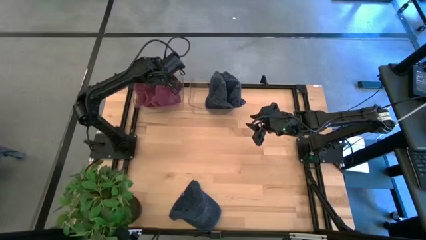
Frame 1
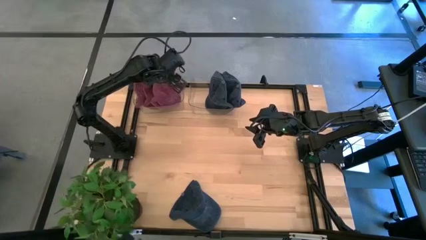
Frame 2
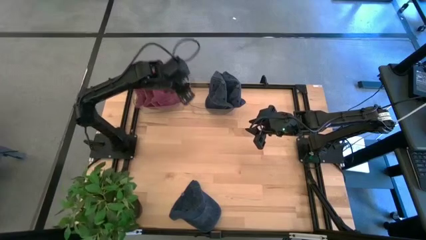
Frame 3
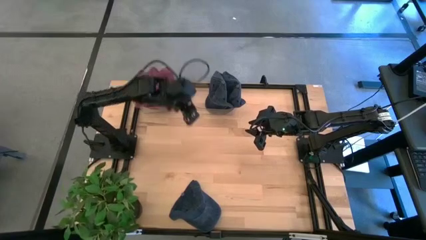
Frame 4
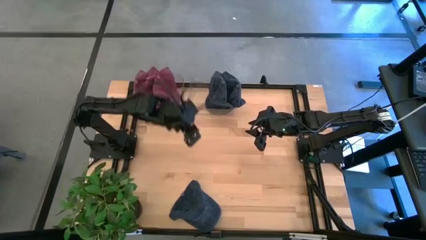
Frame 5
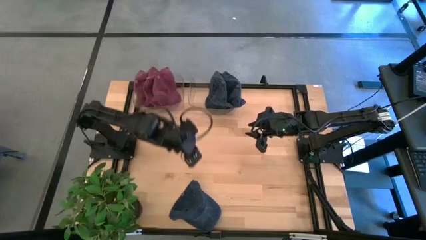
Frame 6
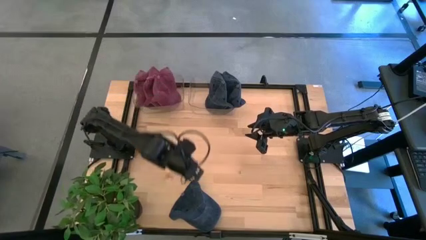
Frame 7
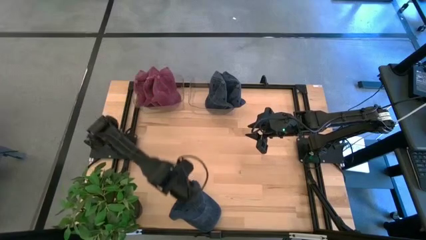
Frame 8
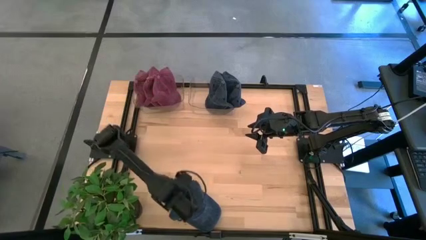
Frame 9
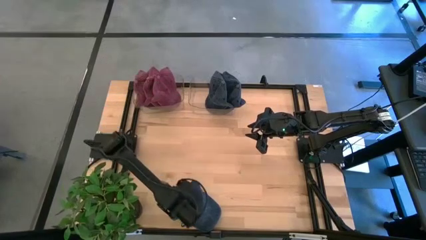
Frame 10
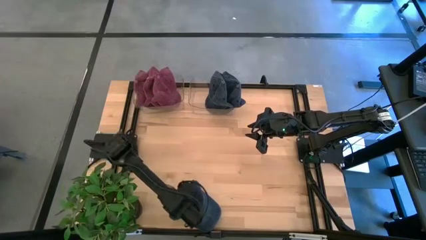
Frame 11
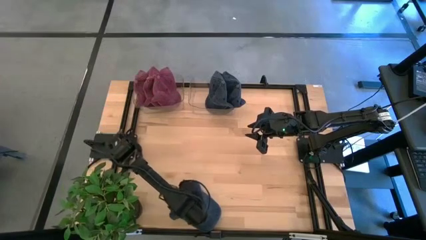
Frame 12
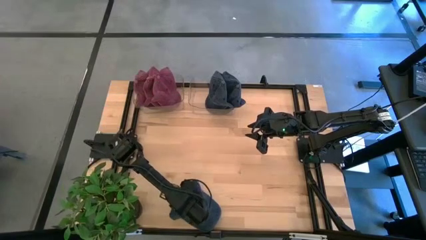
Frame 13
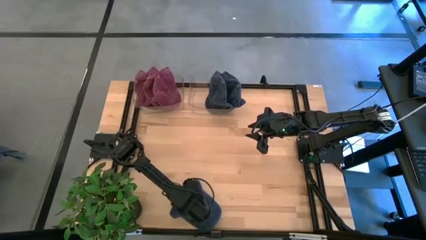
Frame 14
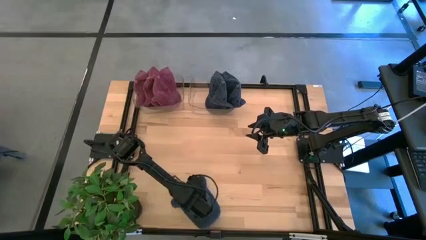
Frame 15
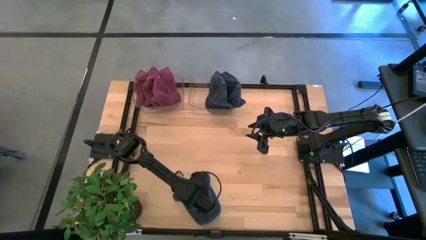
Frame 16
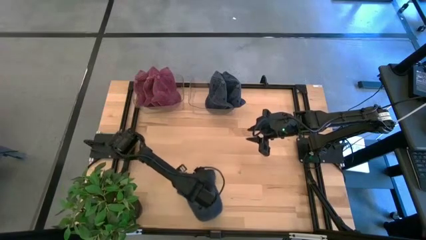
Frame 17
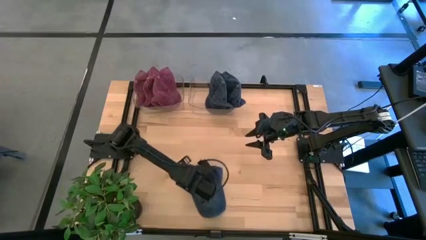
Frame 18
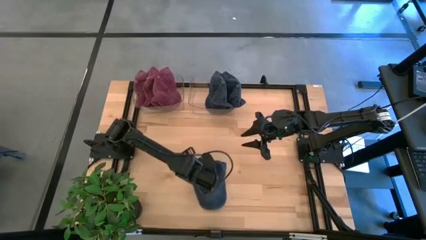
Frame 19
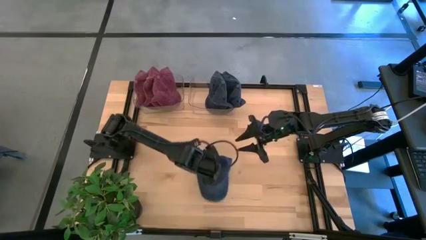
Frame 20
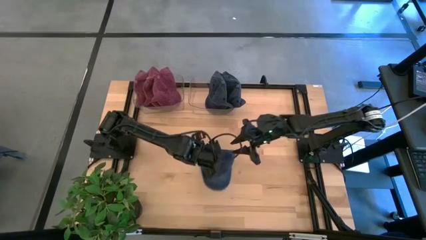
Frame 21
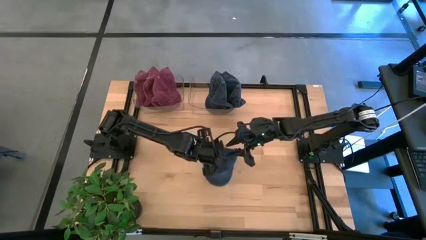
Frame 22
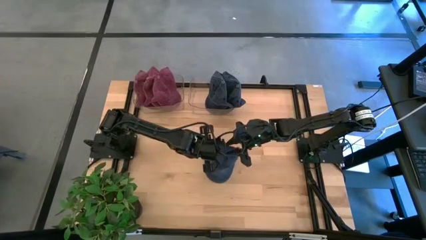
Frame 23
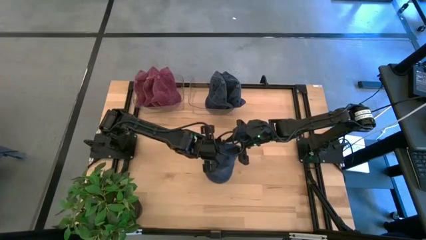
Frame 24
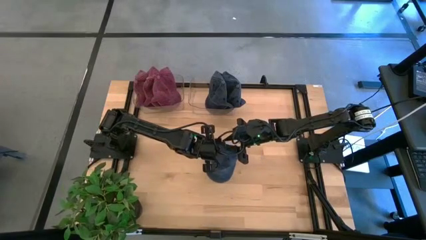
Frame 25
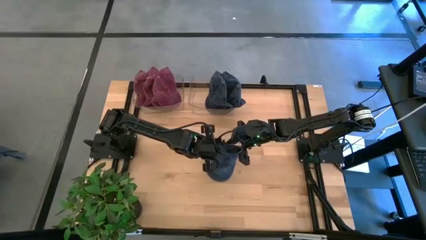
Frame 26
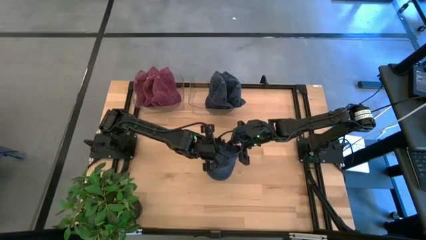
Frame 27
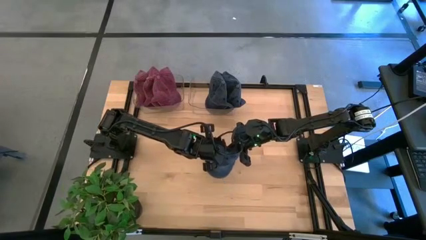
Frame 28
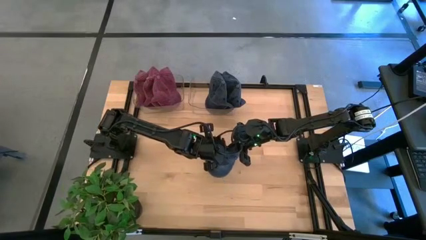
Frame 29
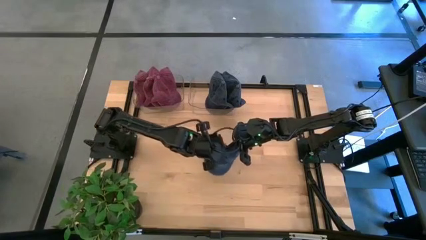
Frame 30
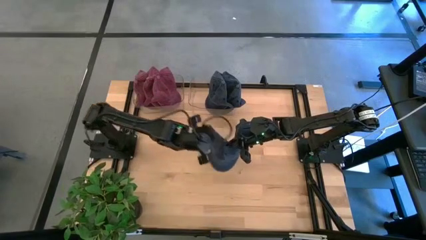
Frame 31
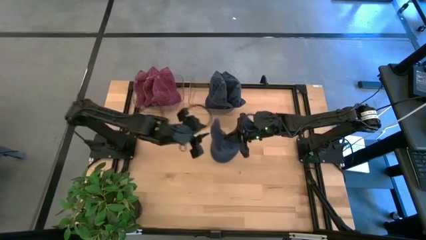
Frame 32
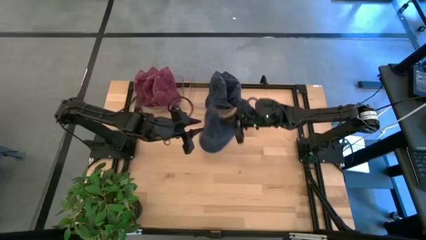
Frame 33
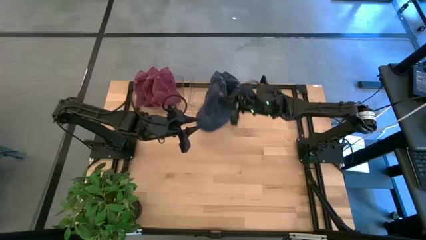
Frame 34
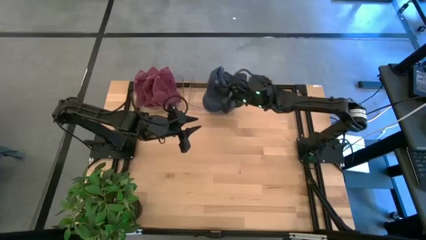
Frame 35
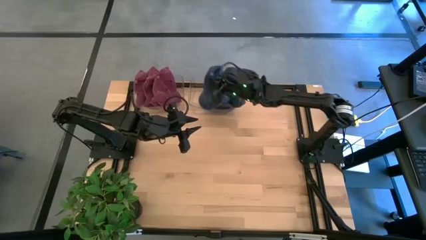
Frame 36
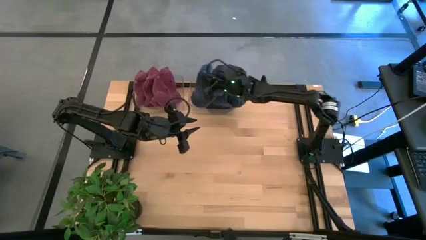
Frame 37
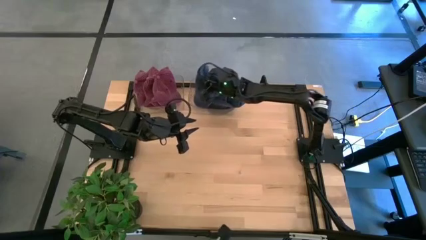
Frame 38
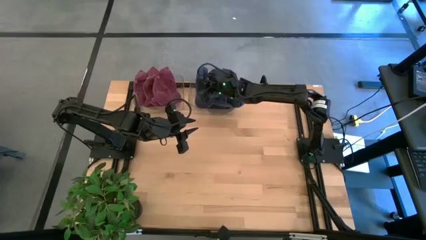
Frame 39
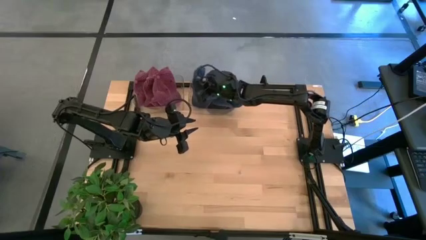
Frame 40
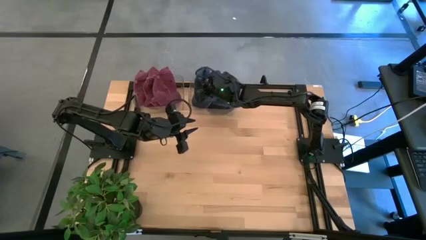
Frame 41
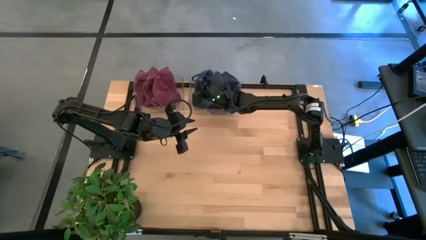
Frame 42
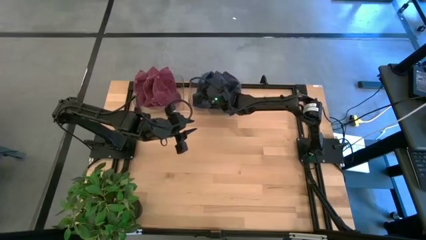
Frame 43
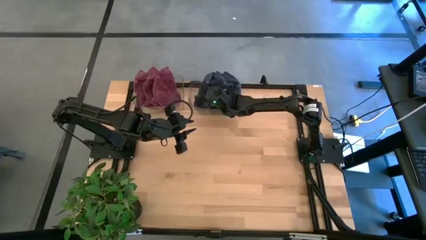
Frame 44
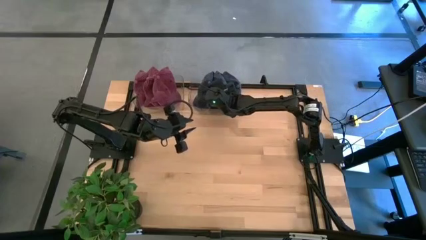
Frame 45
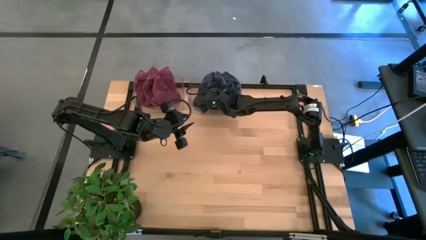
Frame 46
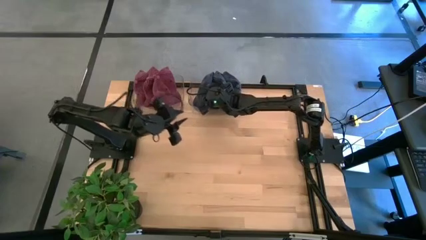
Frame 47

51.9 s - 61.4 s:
Task: Pick & Place hat
Put the blue cap into the right transparent bin

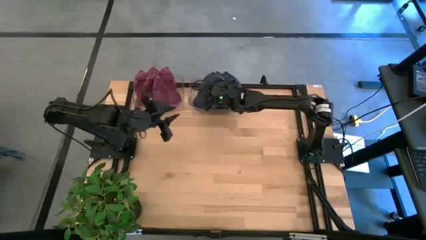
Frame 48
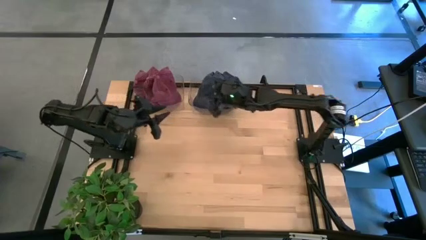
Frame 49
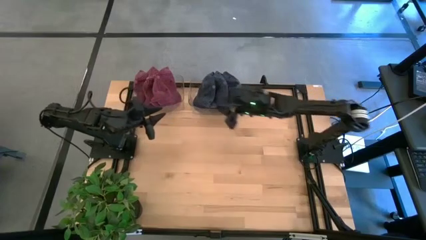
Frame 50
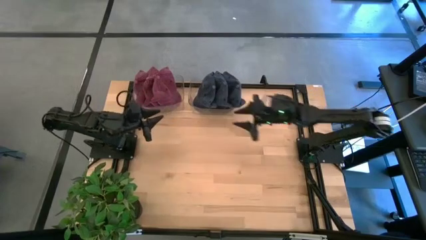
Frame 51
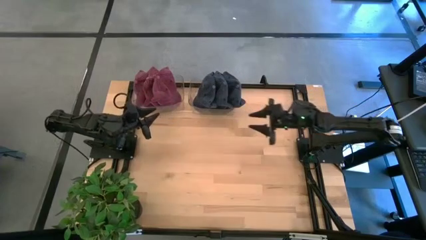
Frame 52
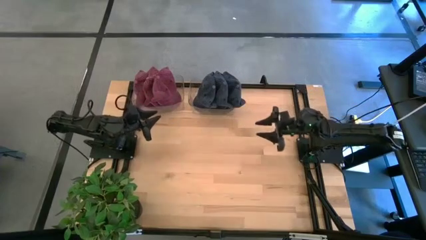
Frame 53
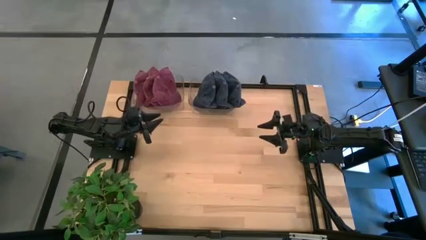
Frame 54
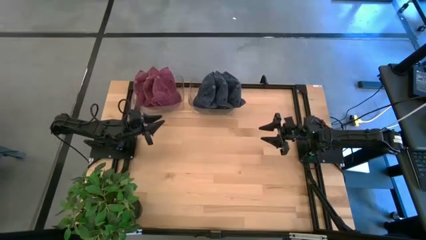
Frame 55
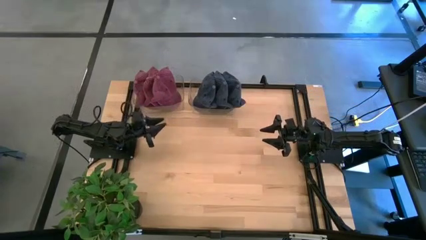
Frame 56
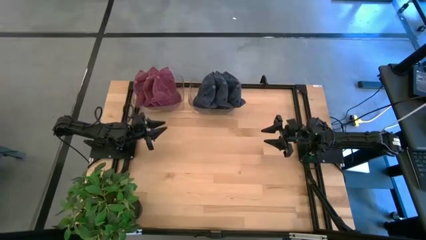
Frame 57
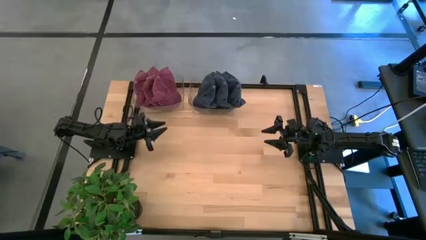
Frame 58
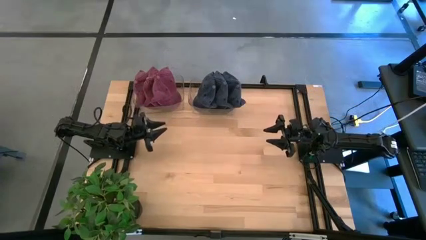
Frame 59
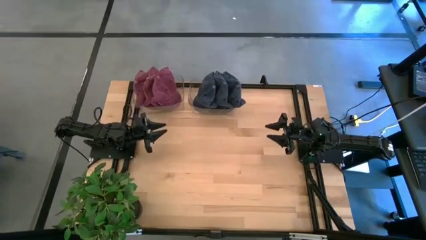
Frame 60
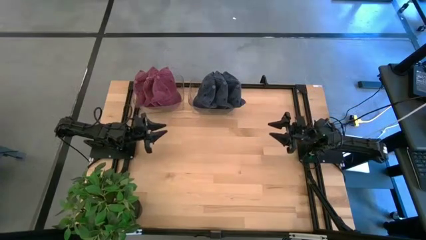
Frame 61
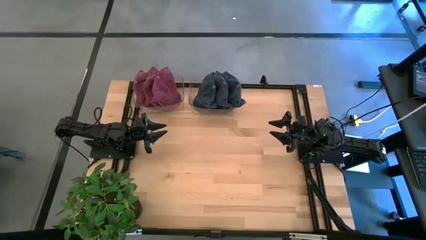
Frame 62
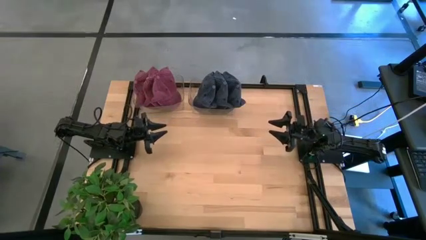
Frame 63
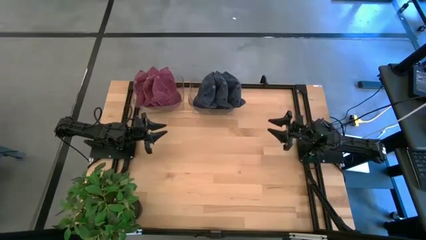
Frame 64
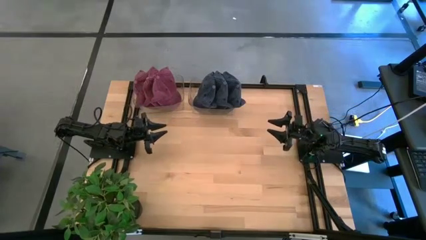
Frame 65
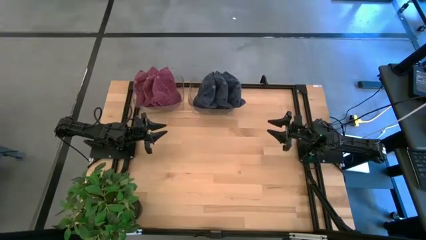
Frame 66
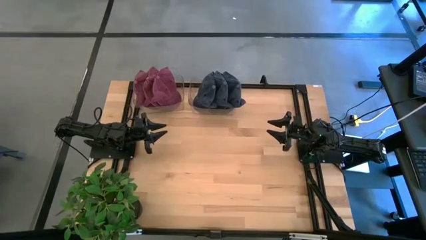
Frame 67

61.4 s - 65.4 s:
Return to Home Position
